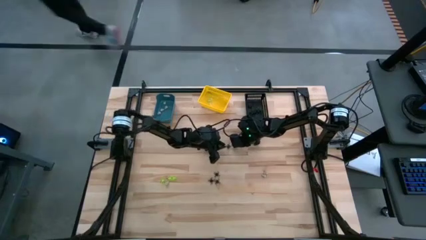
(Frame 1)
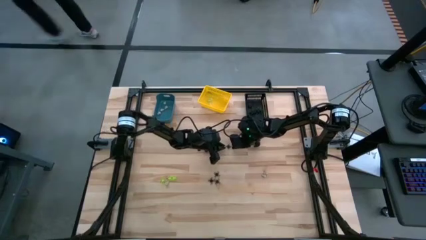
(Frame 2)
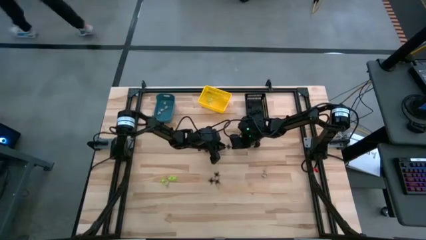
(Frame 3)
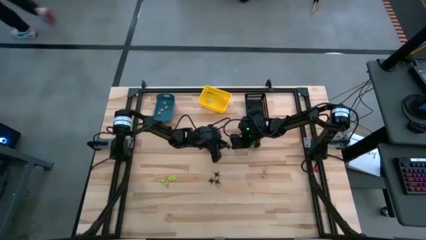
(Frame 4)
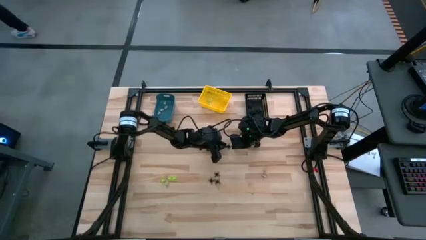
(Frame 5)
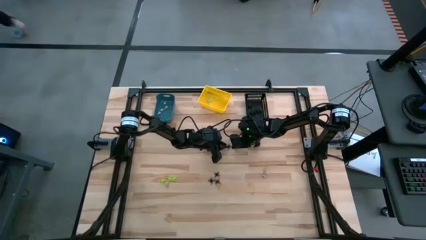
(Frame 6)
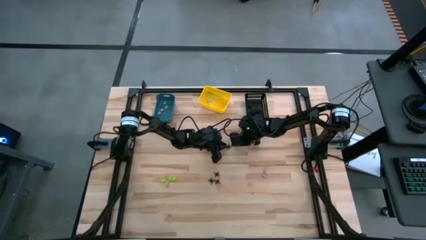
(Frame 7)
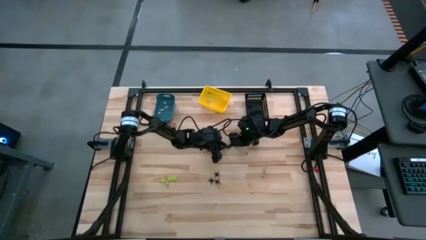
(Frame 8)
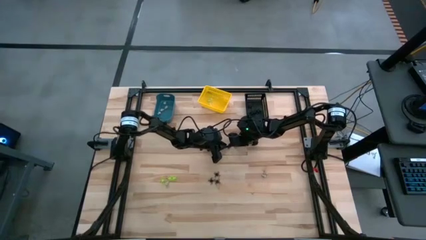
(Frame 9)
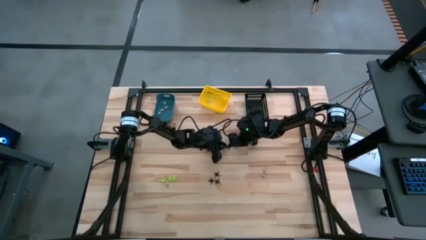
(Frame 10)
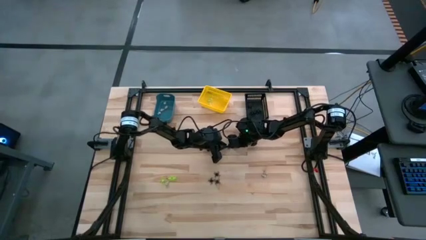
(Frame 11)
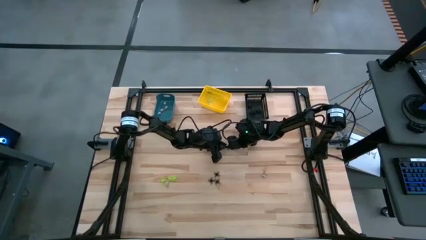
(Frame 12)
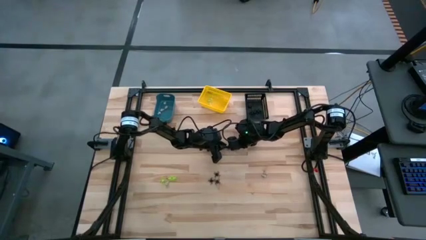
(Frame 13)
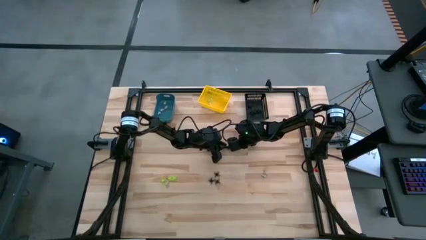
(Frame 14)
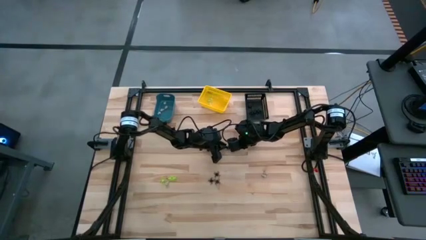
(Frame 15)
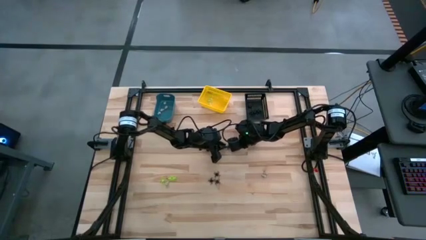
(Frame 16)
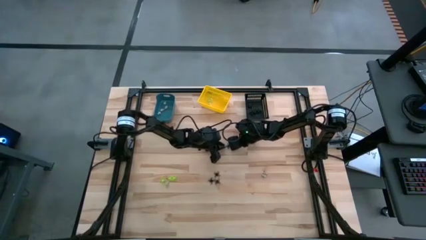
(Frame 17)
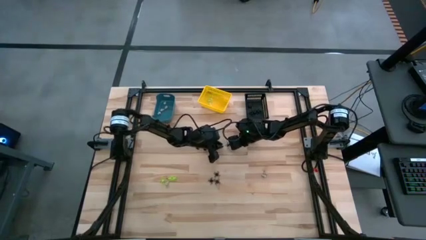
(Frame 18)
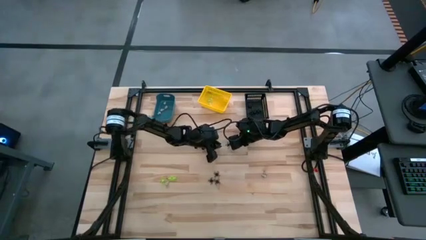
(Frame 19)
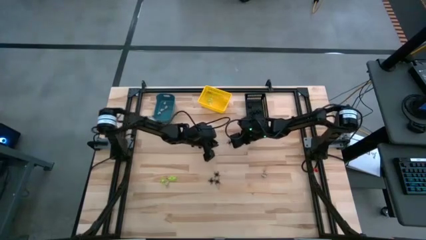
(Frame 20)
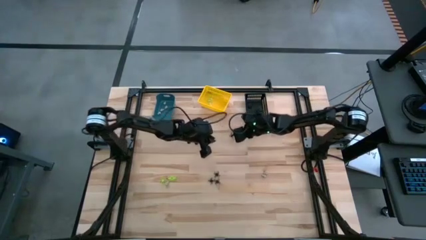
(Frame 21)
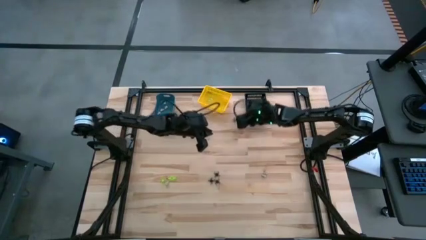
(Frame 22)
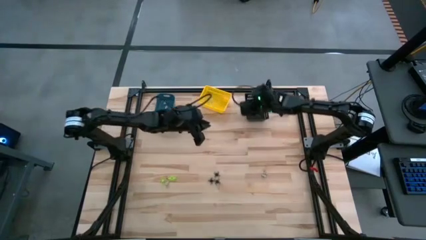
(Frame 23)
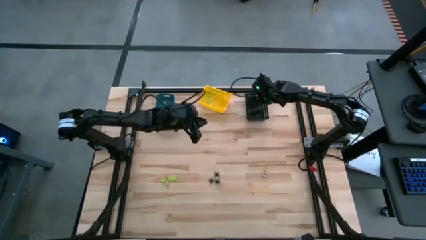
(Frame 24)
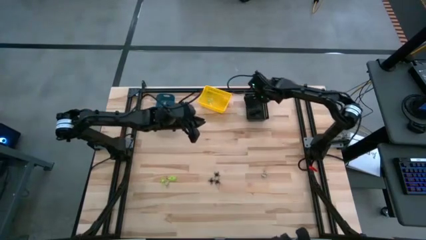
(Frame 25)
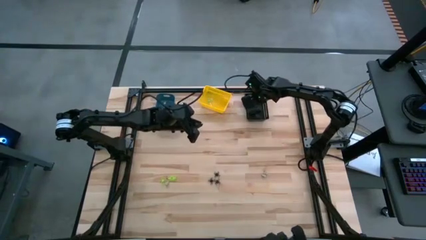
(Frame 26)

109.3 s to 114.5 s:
Task: Sort Halloween decoration
Put the black spider toy into the black bin

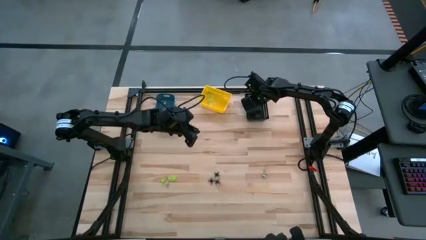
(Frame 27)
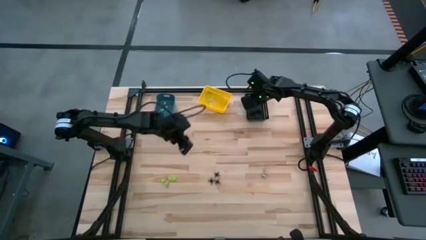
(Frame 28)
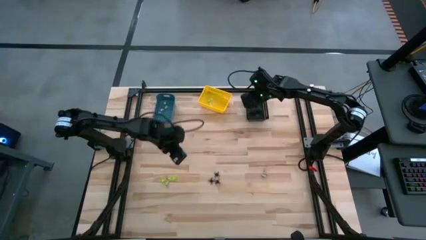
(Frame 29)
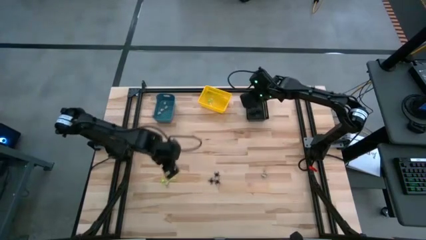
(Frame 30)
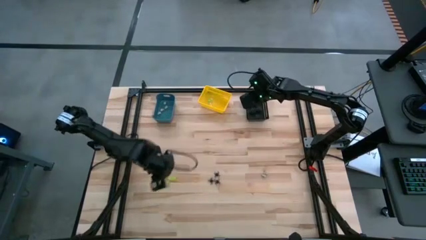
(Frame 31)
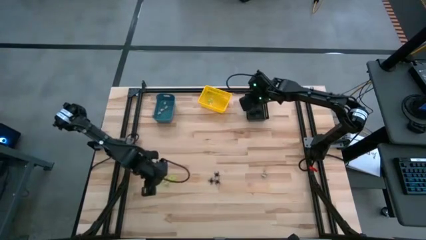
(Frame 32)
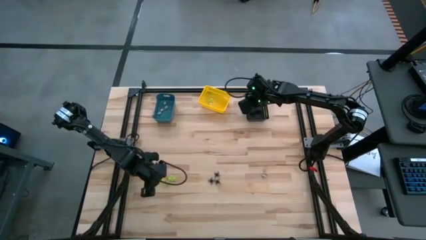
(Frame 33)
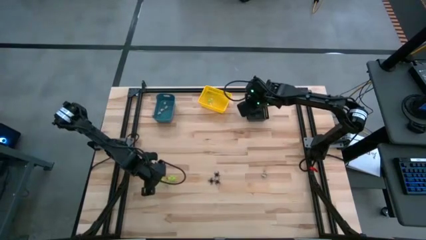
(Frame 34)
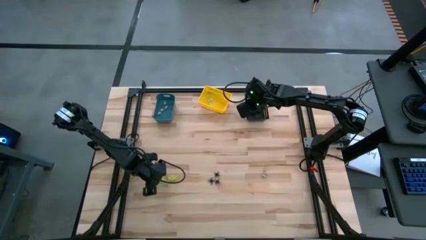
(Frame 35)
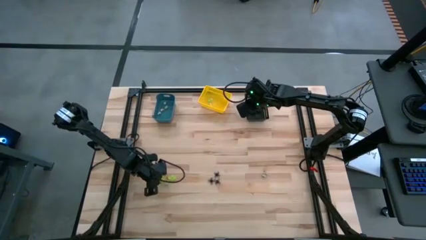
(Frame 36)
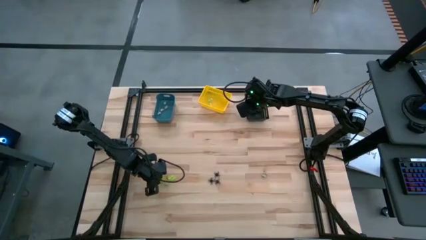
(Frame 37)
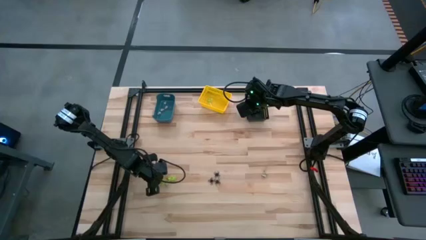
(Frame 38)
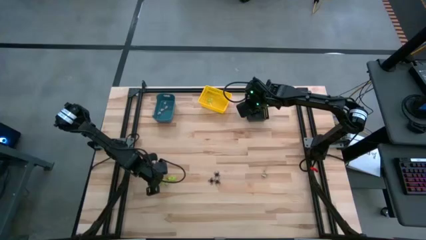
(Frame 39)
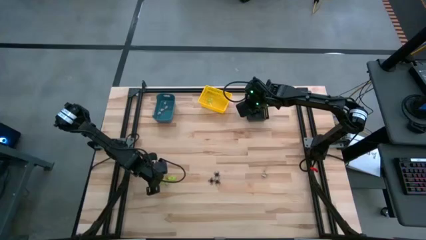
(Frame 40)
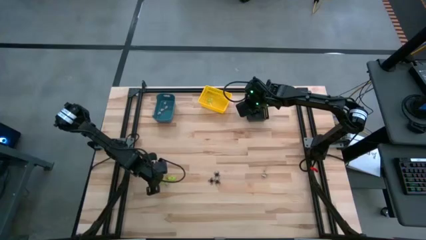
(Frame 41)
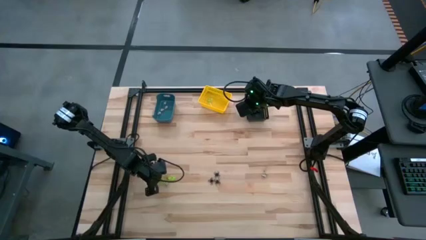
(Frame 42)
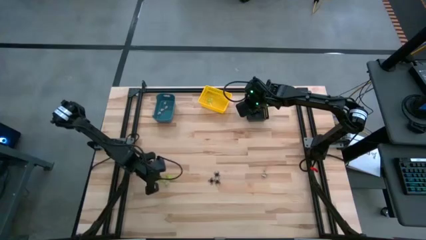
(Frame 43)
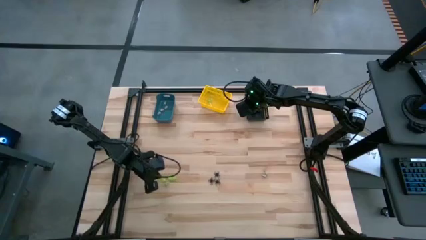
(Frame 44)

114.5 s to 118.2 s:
Put the green spider toy into the yellow bin

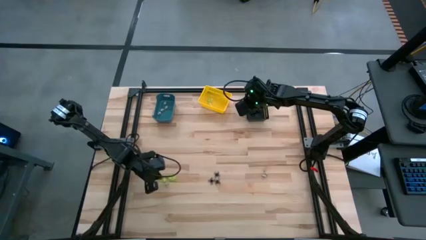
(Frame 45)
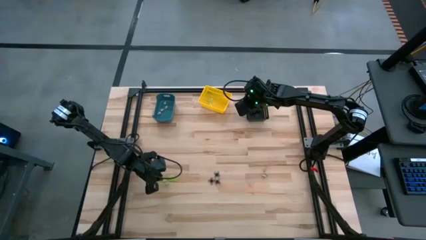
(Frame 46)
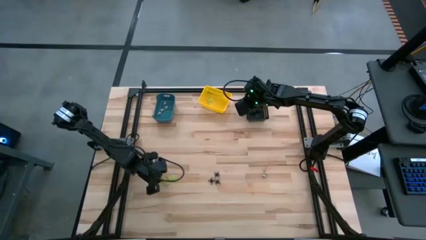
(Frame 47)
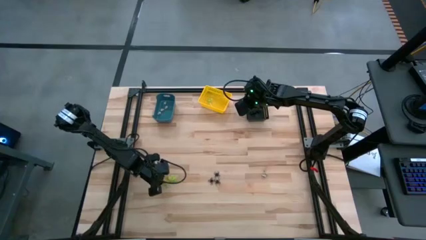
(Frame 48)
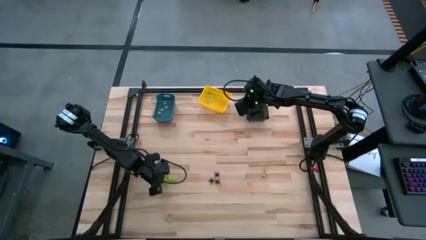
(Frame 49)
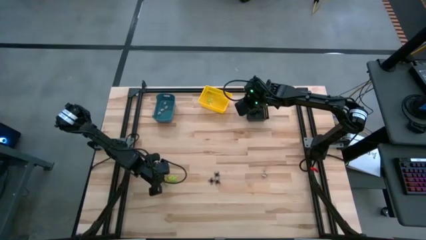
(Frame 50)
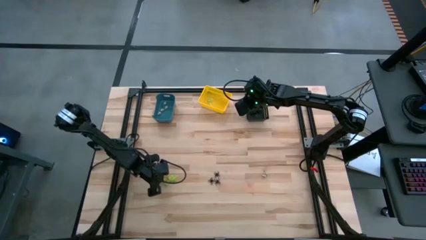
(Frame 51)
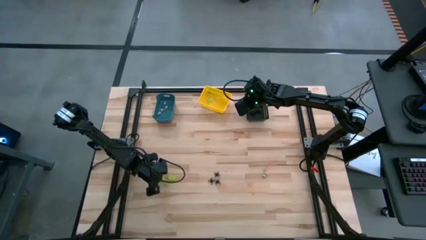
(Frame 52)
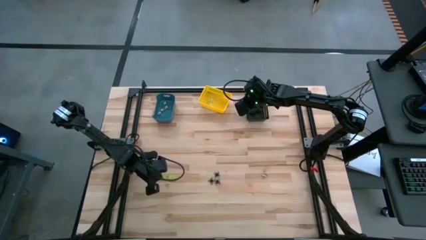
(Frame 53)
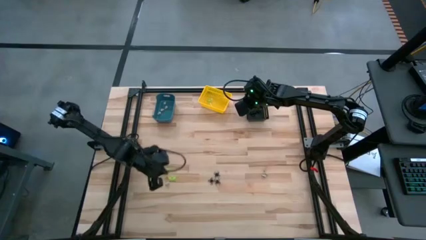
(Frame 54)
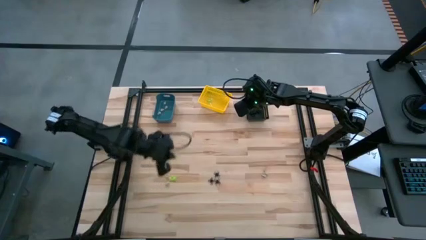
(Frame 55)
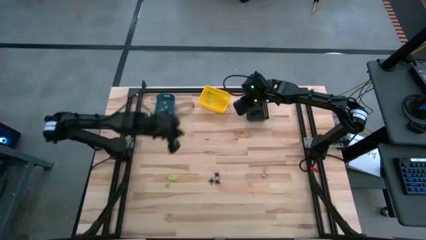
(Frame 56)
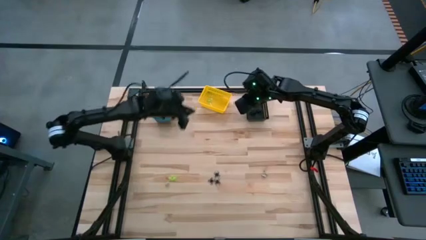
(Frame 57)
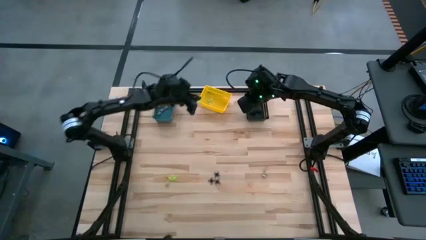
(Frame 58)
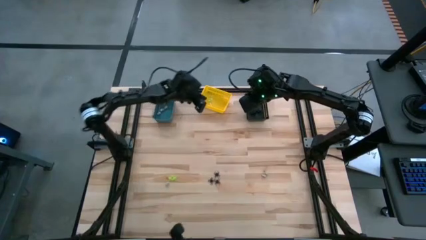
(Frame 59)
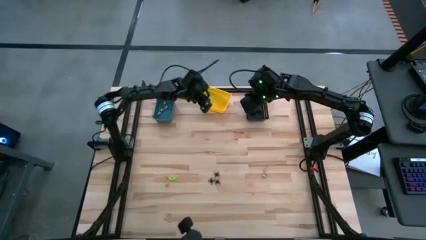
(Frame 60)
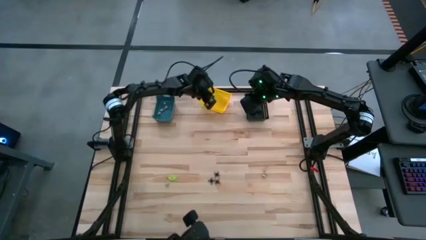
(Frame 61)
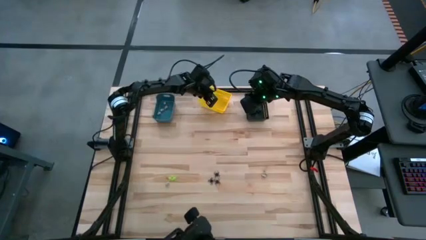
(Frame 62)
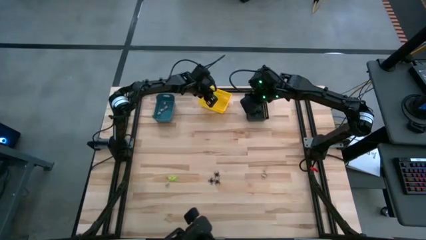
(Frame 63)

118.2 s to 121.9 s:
Put the green spider toy into the yellow bin

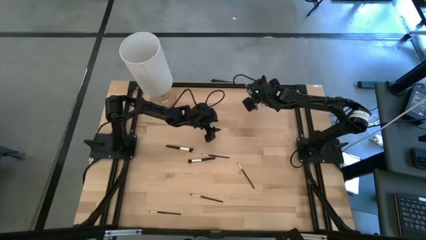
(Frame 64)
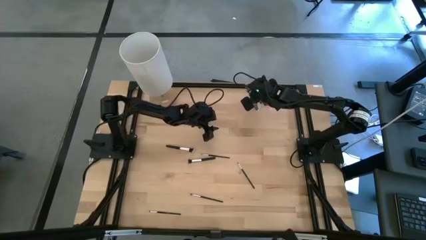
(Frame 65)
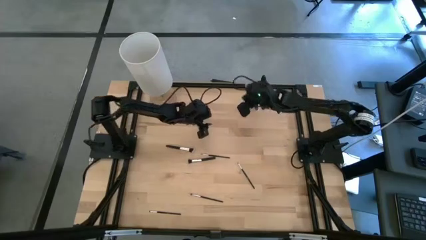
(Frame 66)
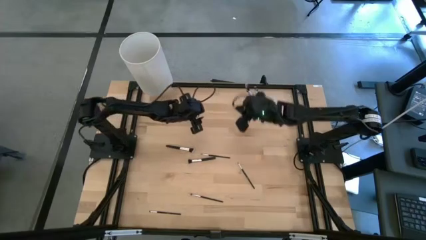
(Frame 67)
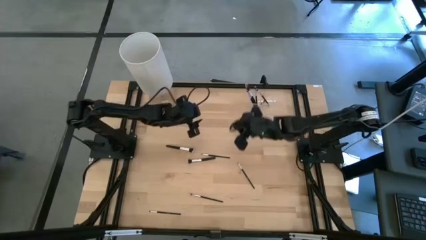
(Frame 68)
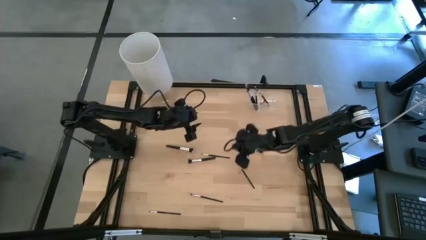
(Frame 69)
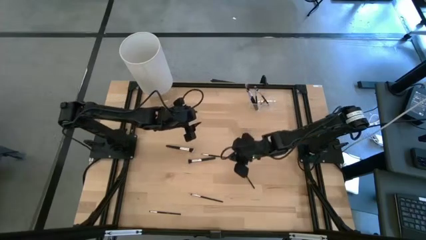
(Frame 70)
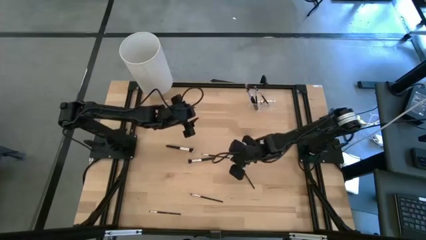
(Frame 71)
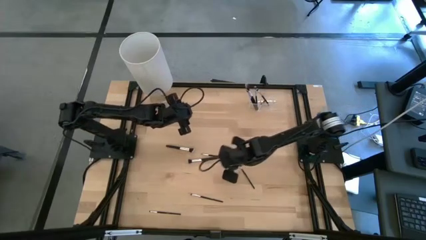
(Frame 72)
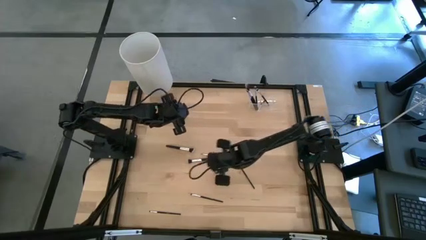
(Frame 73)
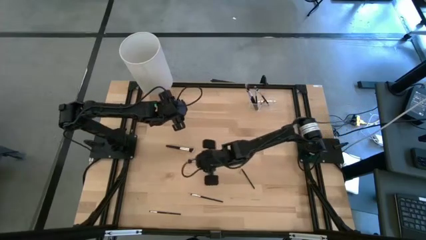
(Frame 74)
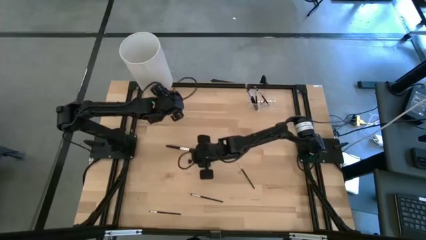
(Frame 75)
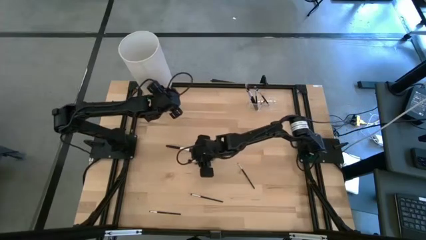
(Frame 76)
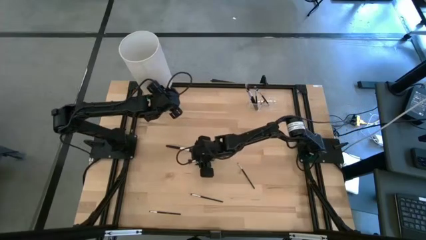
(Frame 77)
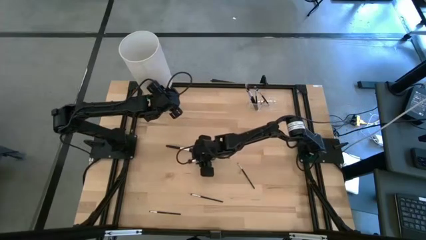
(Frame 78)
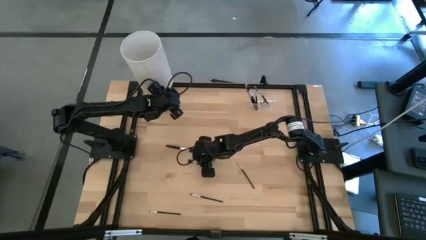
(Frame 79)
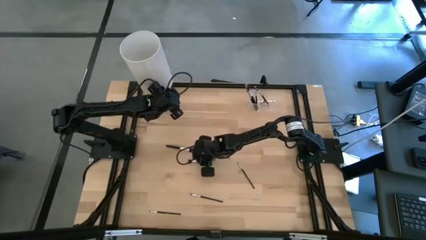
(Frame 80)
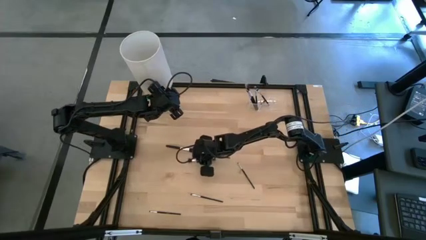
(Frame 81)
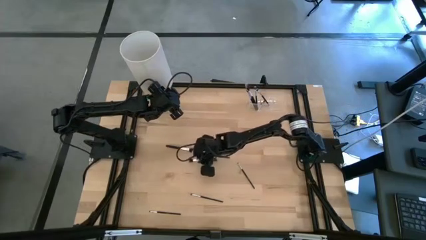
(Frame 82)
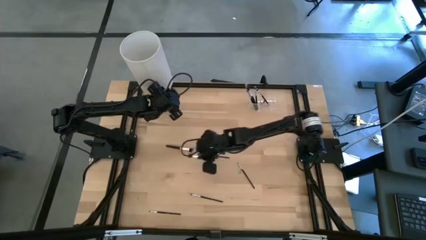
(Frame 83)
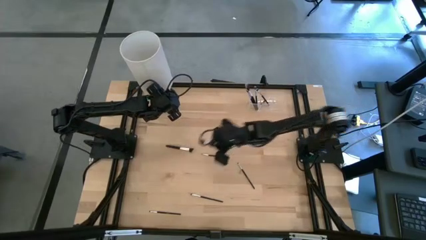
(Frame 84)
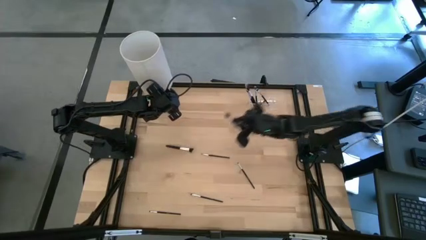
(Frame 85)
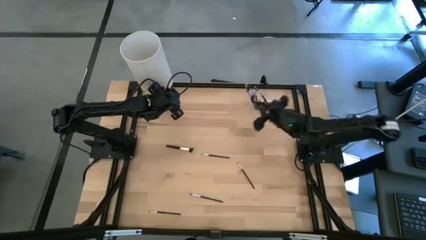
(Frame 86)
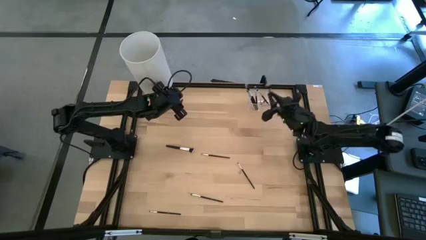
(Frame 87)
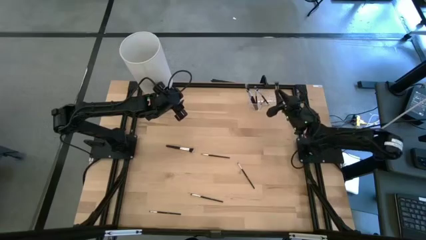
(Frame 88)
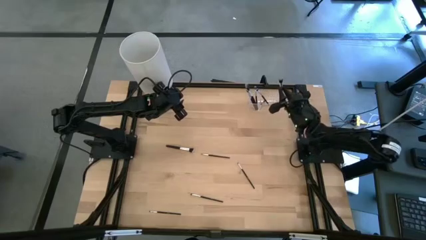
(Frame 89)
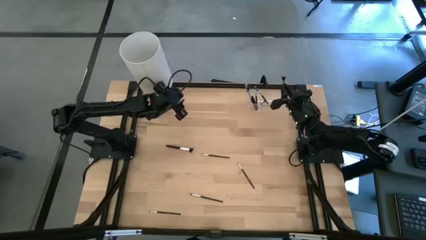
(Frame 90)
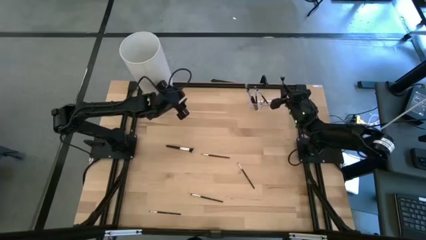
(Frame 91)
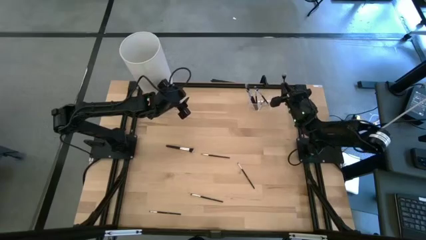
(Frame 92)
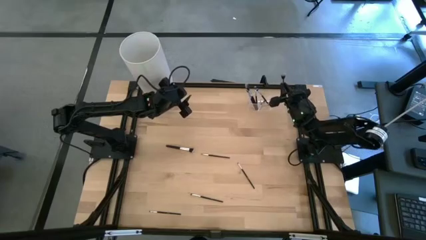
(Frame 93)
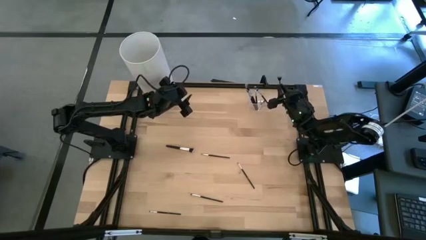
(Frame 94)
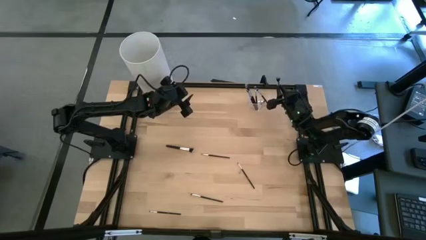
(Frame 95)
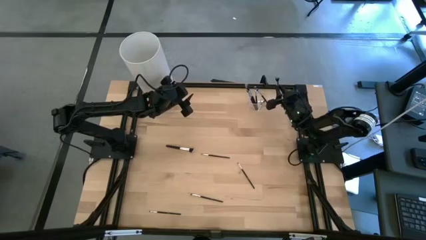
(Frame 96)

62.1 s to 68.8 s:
Task: Put items in baskets/containers
Put the powder brush into the right side of the transparent organizer
